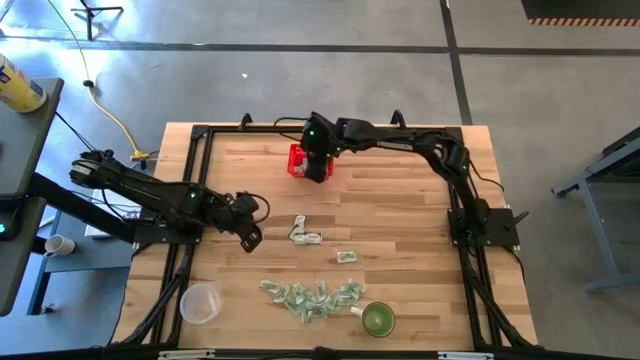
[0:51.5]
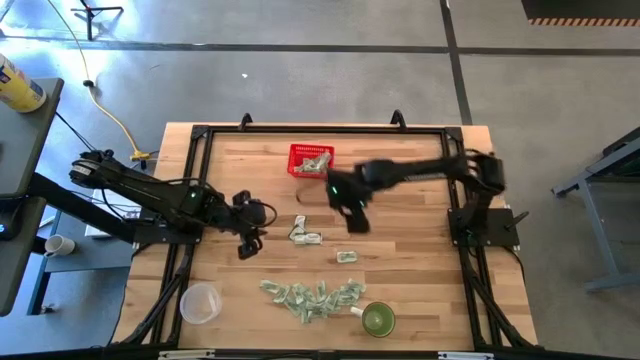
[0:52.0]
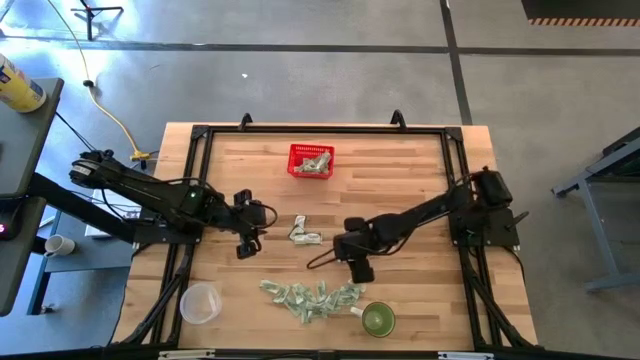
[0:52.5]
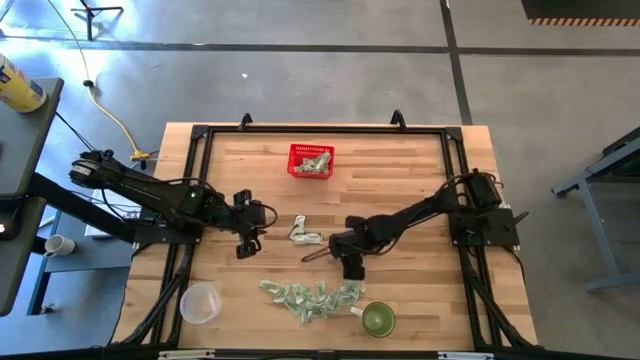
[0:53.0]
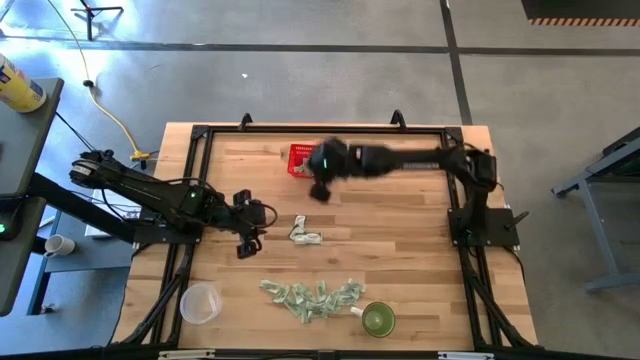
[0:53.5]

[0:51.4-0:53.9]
Task: Pick and place items into bin
Put the light green stevia packet into the red bin

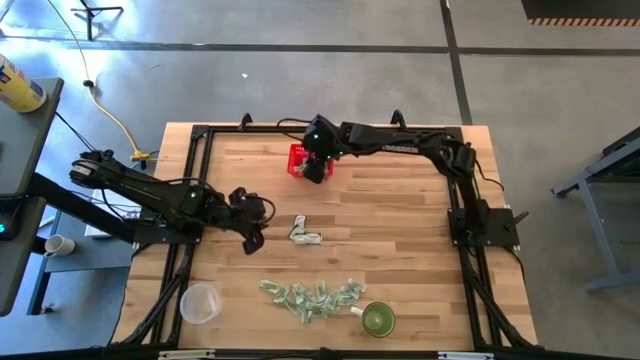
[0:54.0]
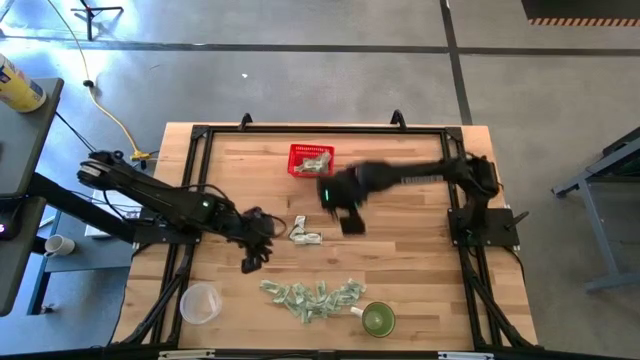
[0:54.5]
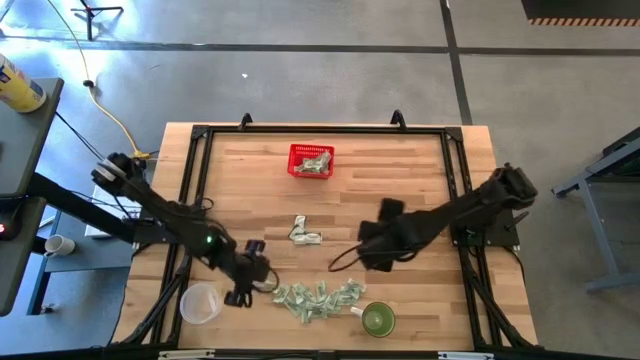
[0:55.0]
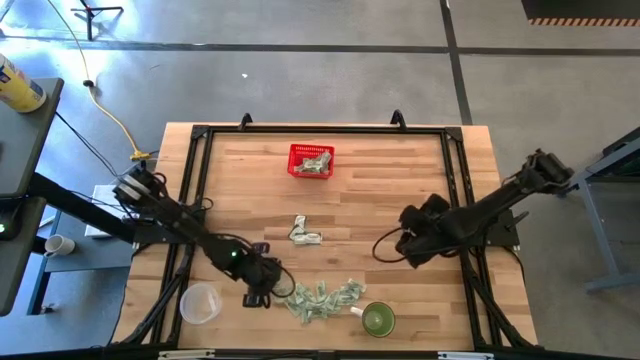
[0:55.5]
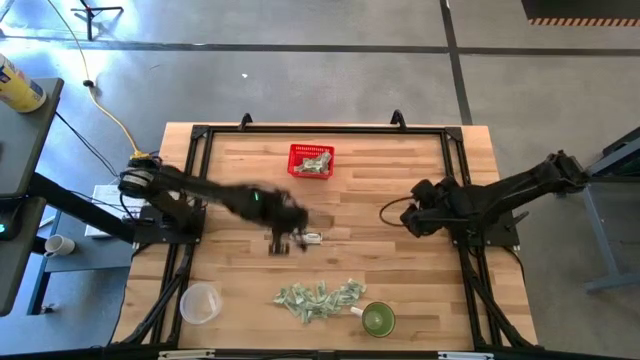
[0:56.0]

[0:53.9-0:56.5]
Put the light green stevia packet into the red bin

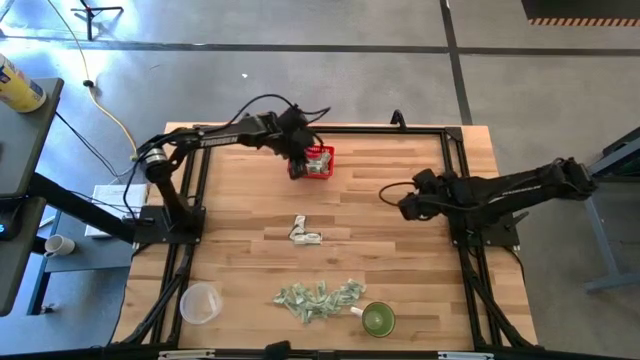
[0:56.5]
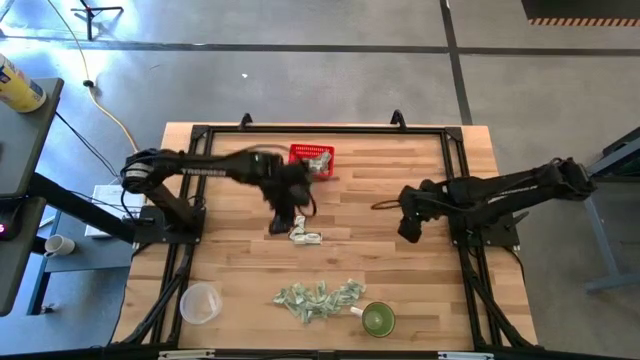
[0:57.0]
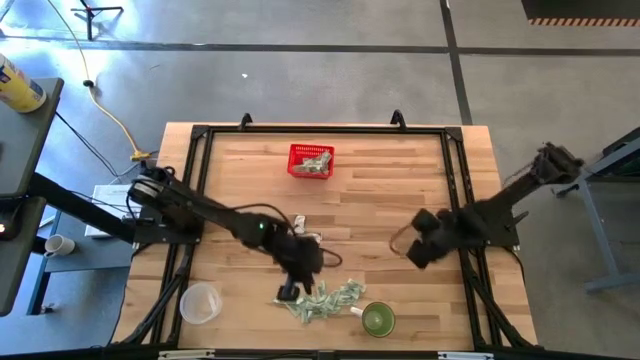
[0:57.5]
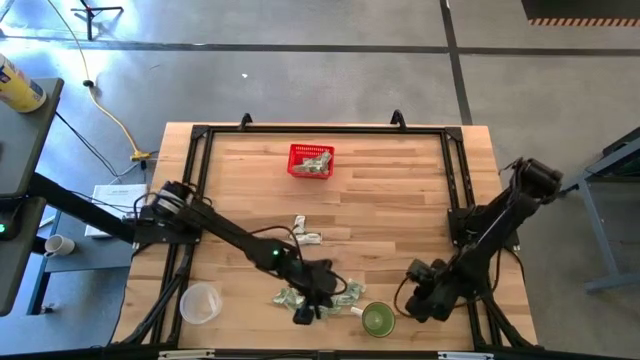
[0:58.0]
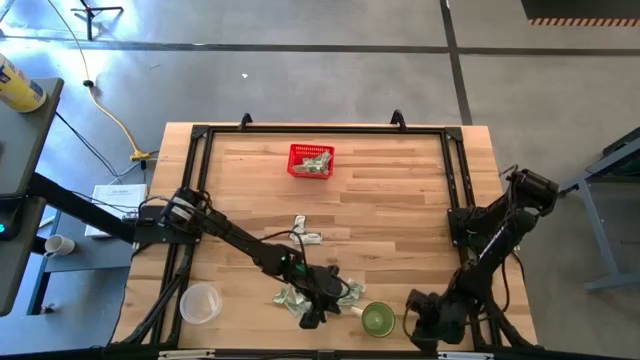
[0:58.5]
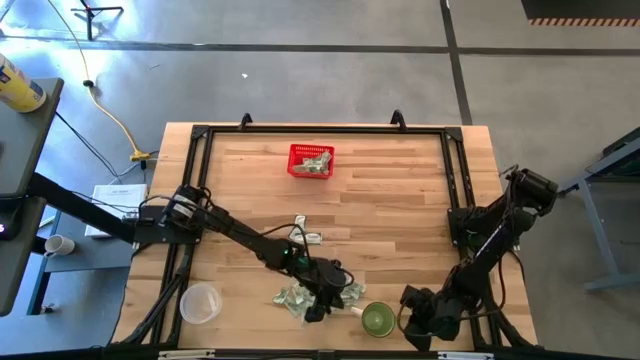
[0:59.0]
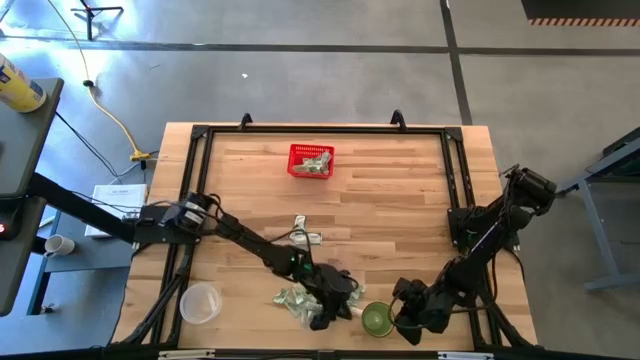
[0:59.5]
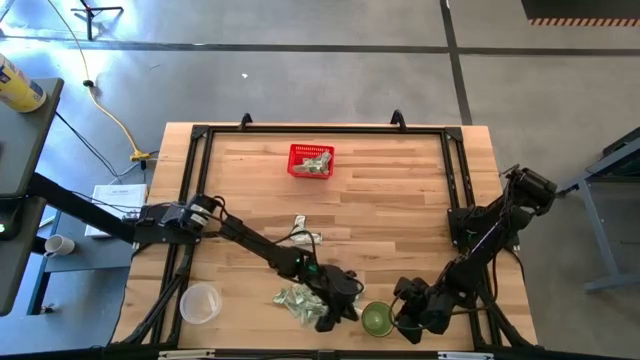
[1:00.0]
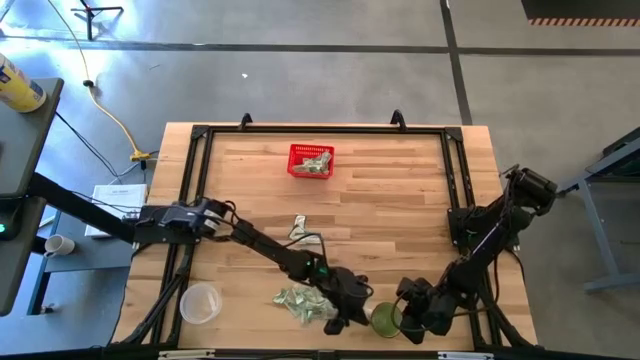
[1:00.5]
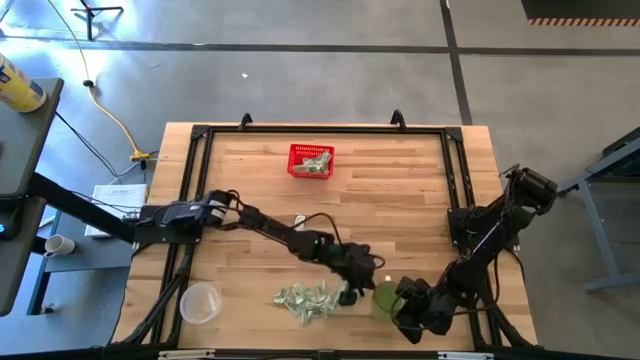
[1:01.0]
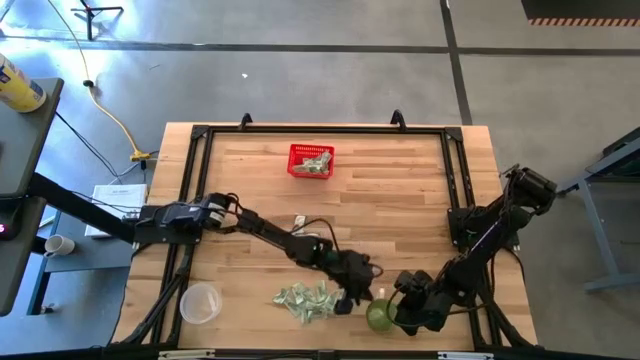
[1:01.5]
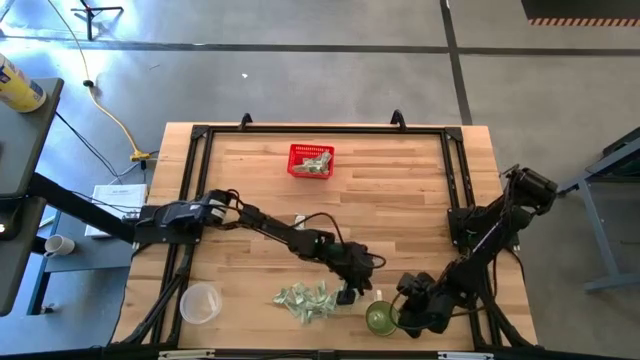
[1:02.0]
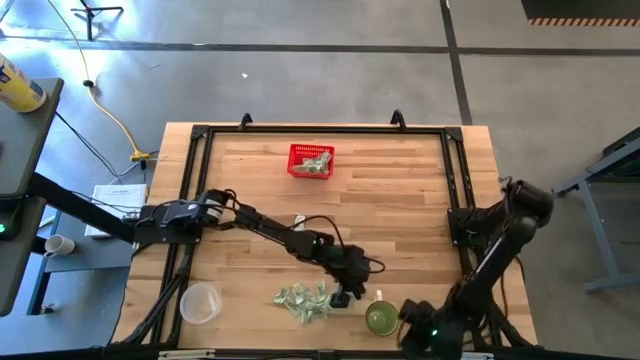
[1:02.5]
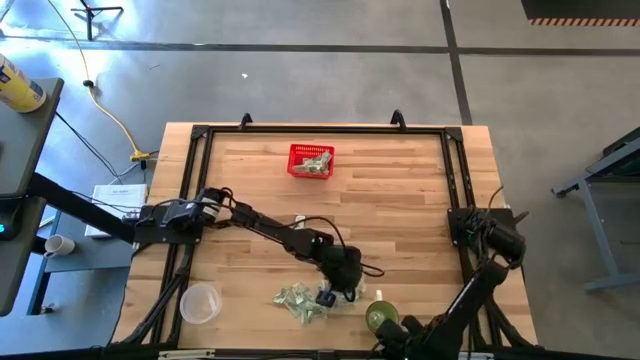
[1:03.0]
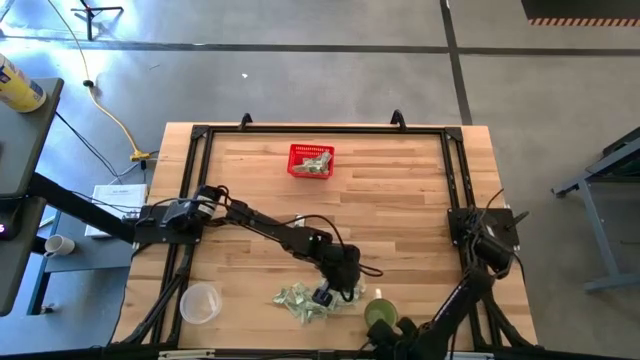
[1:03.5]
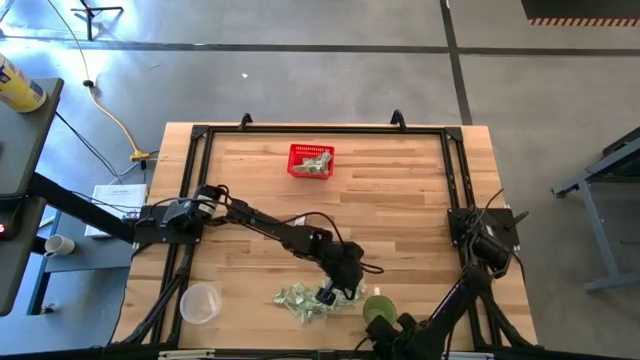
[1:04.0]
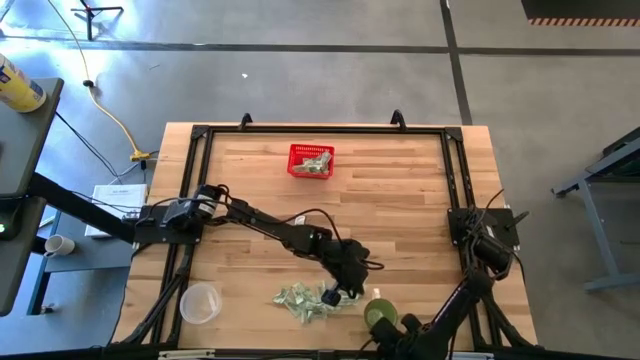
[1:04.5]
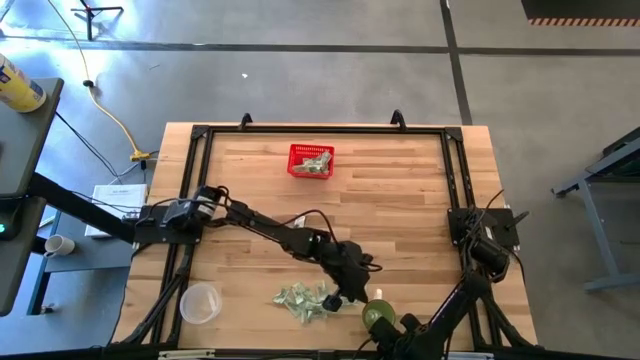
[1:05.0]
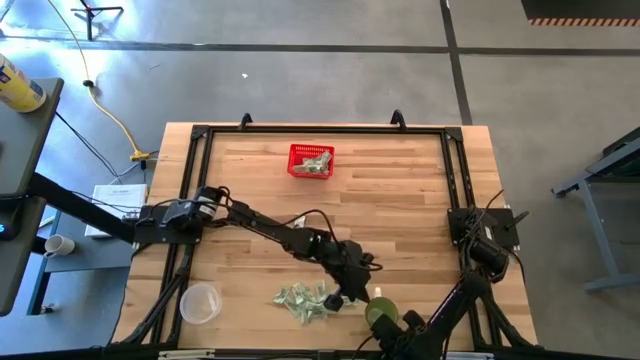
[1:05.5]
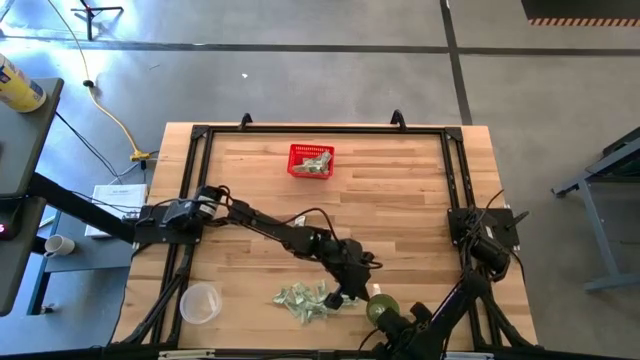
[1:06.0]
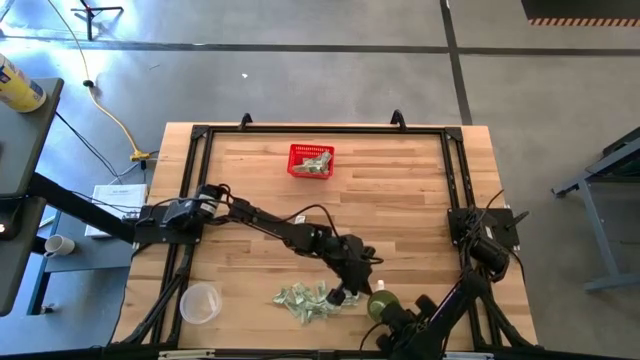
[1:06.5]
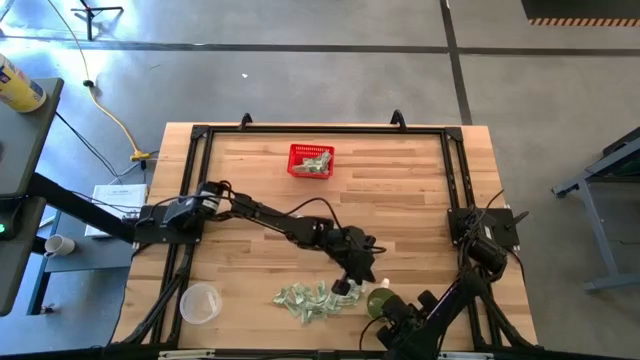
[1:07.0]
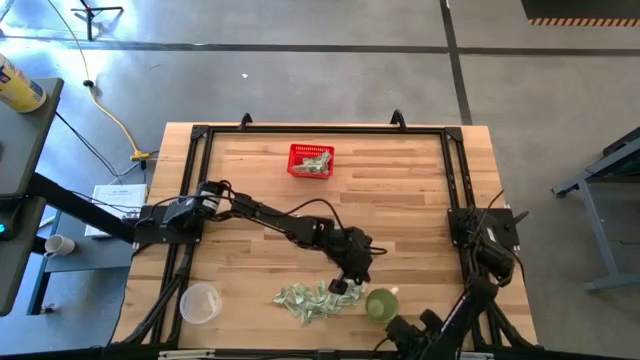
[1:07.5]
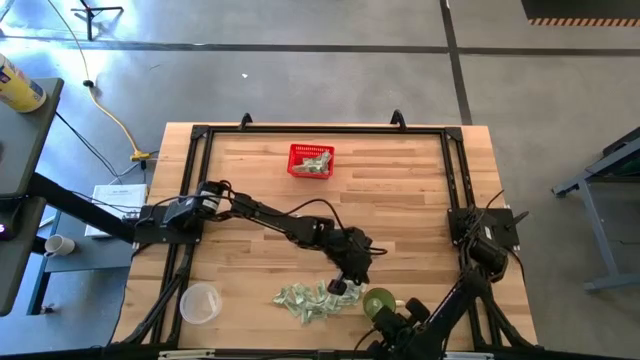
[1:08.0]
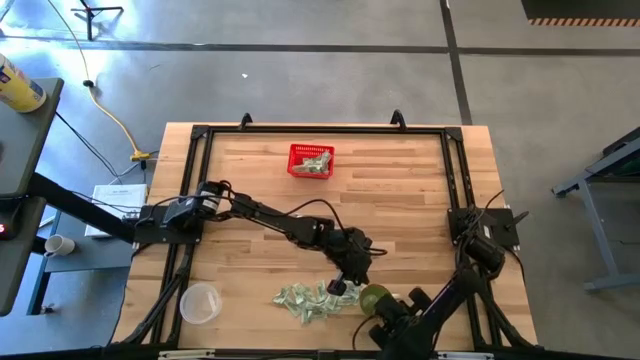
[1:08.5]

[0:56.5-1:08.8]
Adjust the green mug

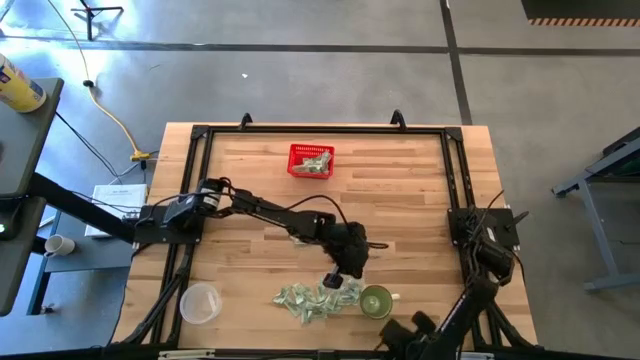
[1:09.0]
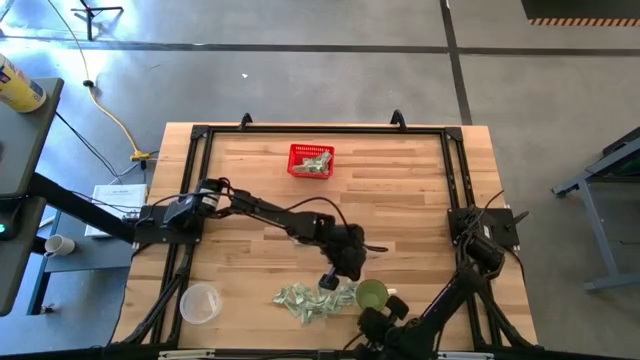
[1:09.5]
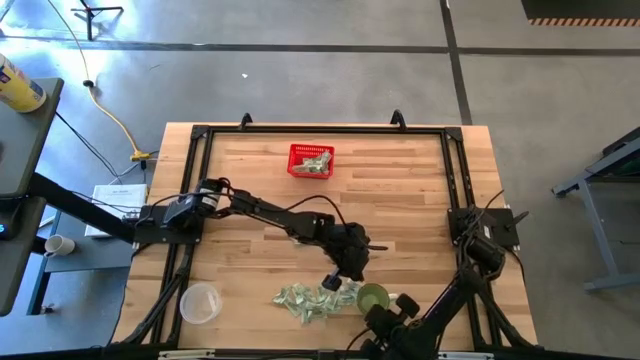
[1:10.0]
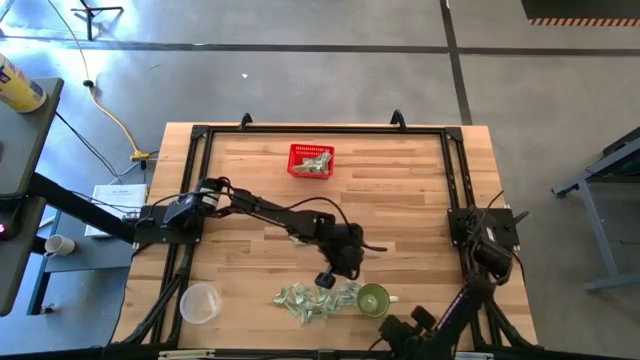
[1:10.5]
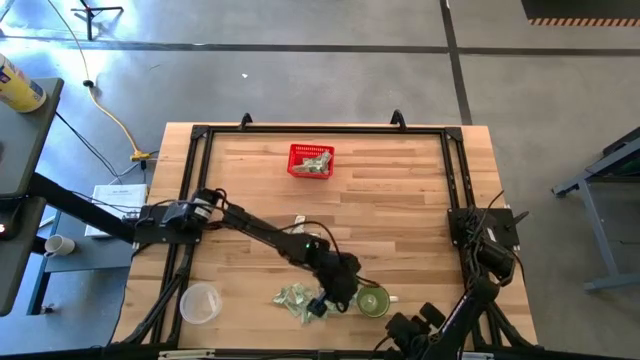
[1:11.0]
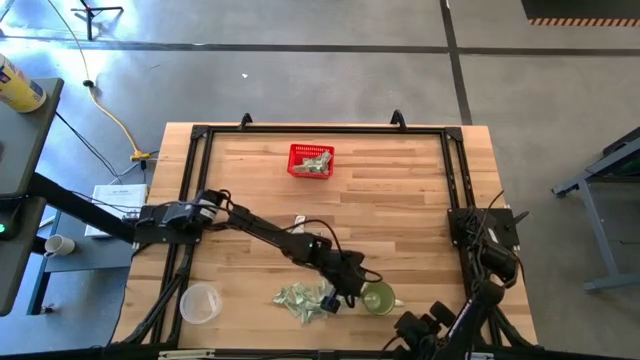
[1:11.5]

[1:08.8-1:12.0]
Adjust the green mug

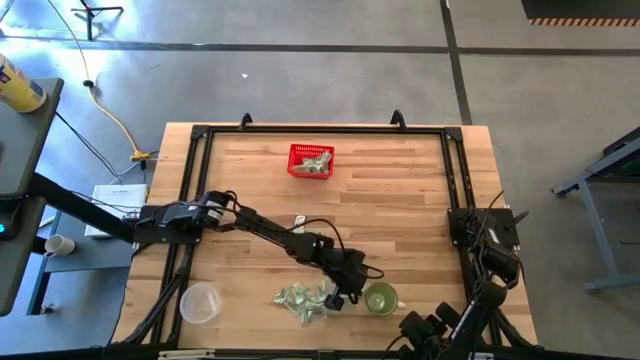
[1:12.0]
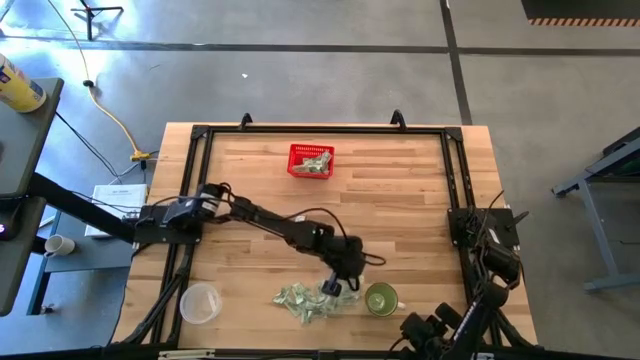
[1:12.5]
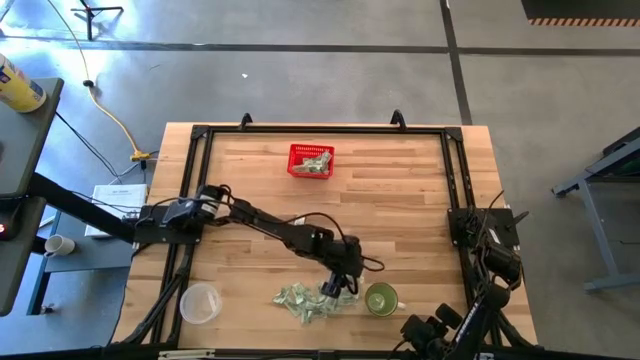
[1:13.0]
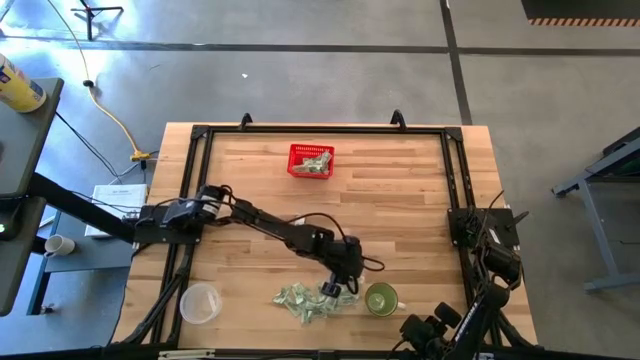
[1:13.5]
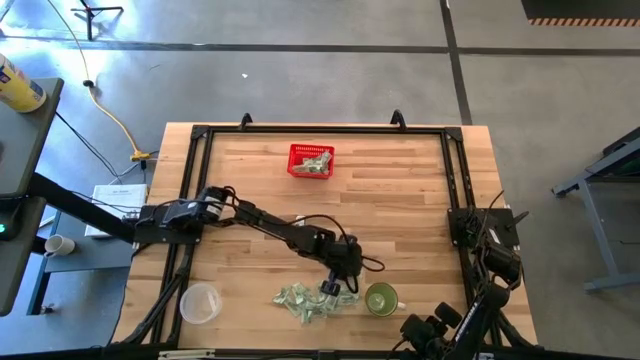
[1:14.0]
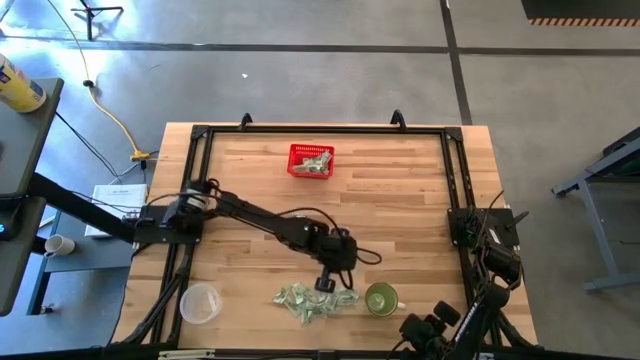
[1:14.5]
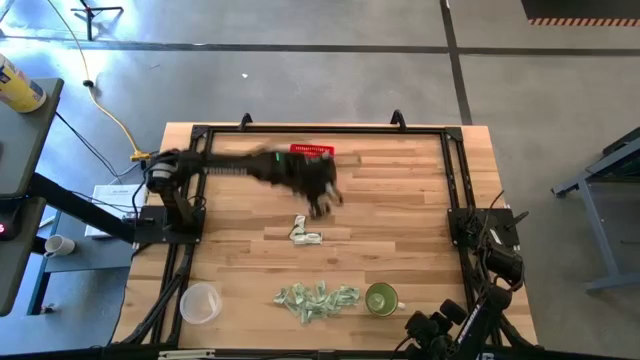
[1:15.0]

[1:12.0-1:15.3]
Put the light green stevia packet into the red bin
